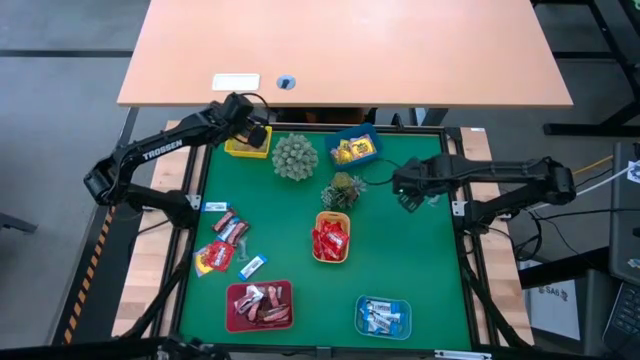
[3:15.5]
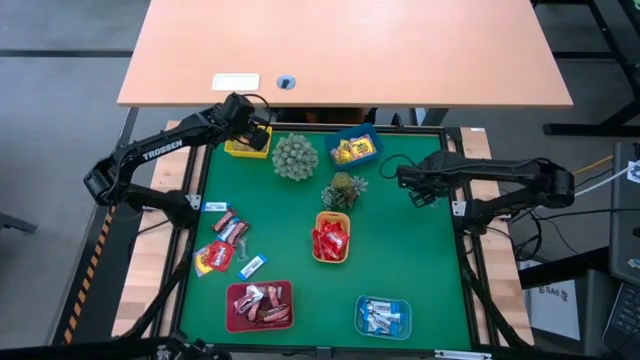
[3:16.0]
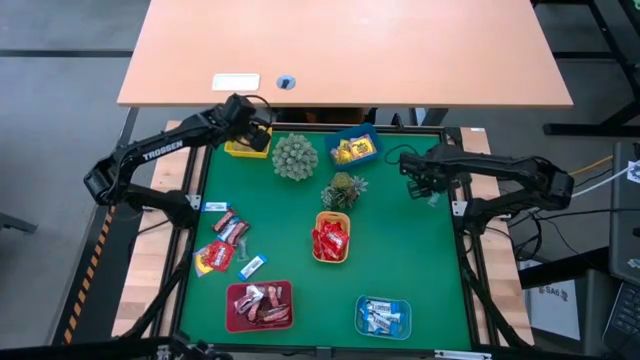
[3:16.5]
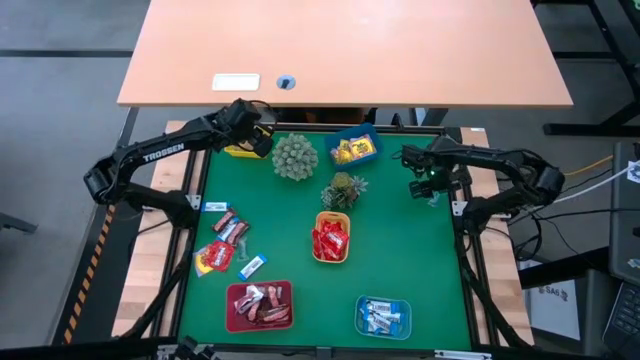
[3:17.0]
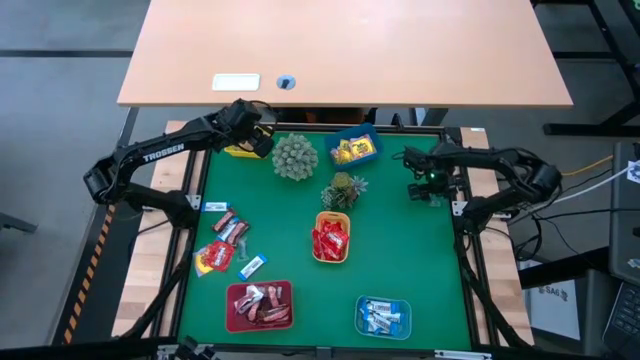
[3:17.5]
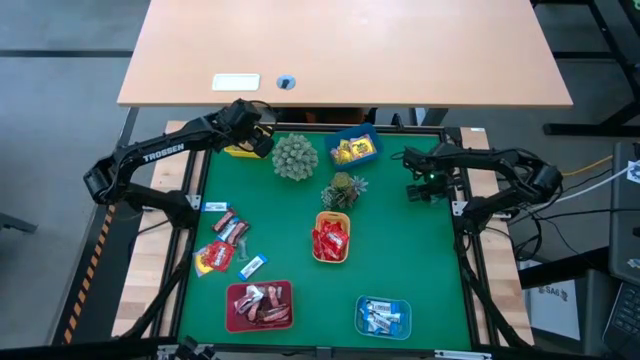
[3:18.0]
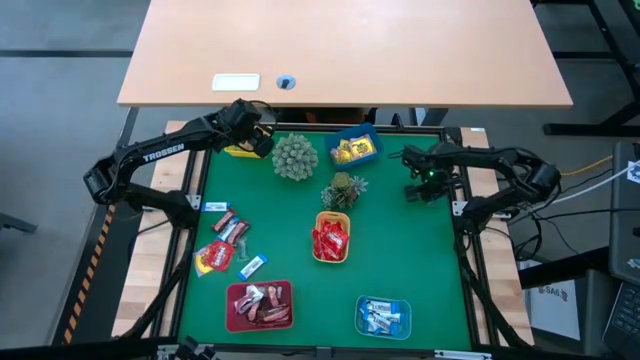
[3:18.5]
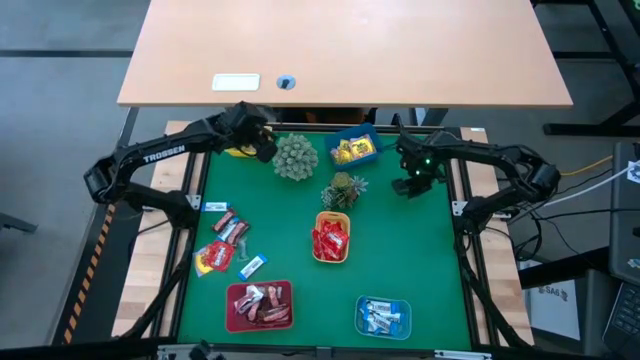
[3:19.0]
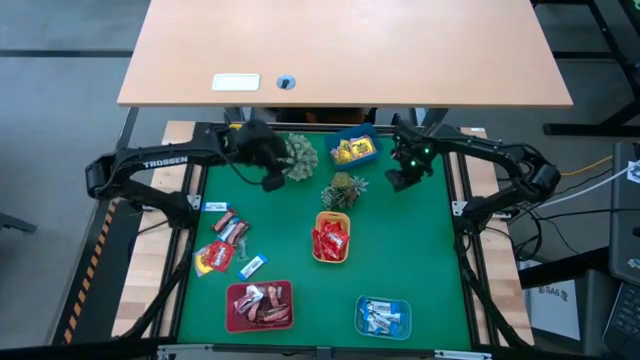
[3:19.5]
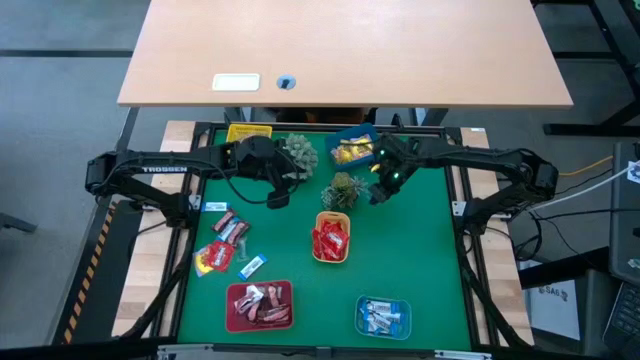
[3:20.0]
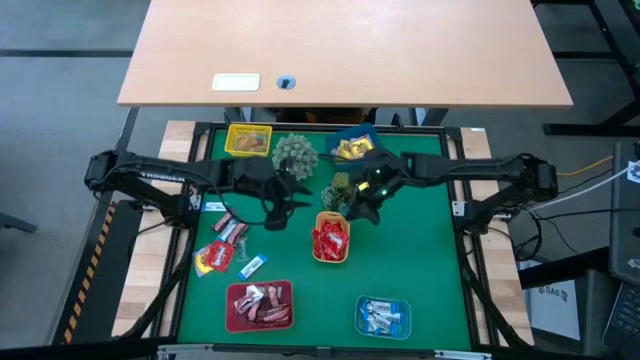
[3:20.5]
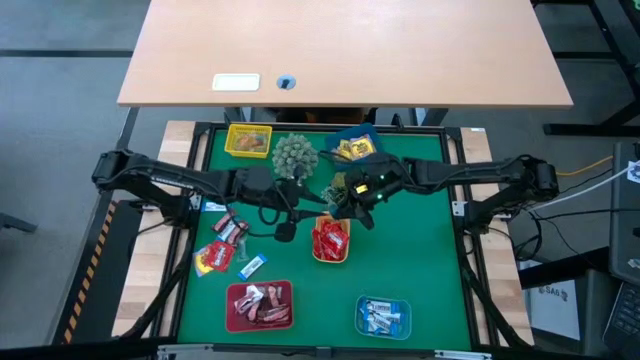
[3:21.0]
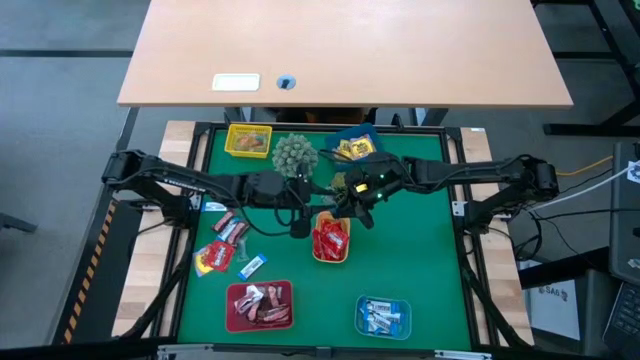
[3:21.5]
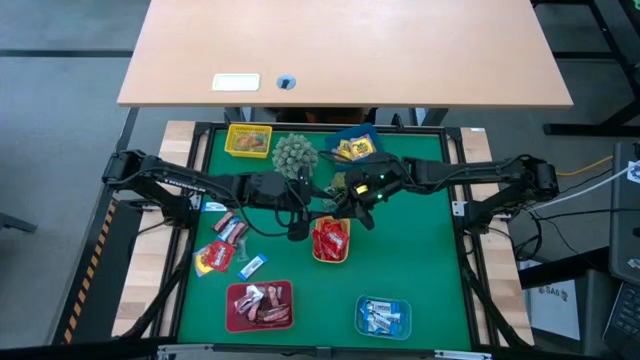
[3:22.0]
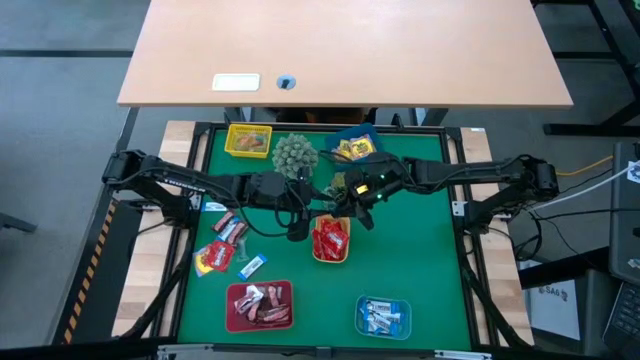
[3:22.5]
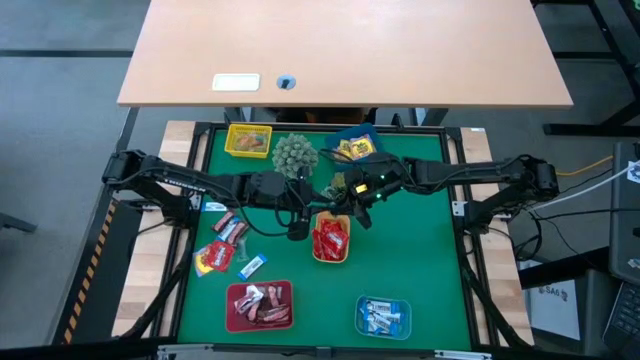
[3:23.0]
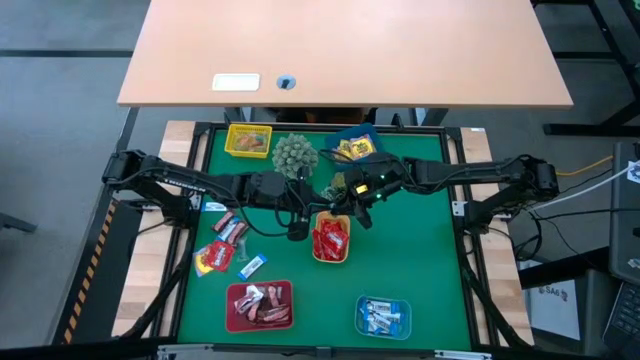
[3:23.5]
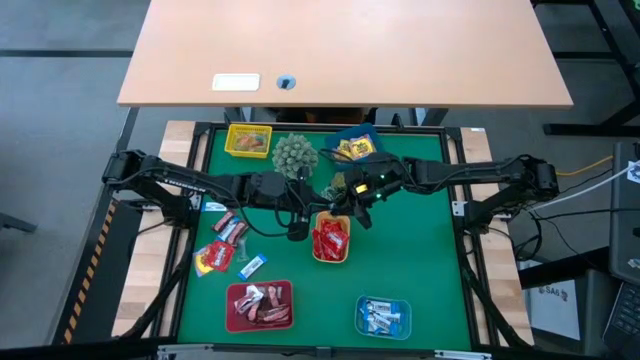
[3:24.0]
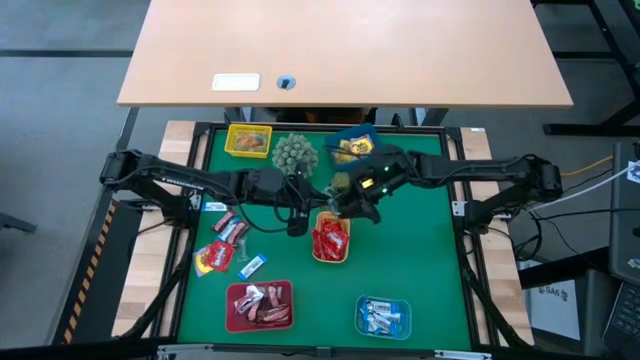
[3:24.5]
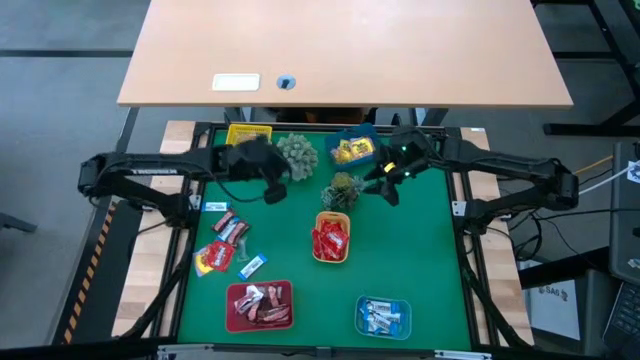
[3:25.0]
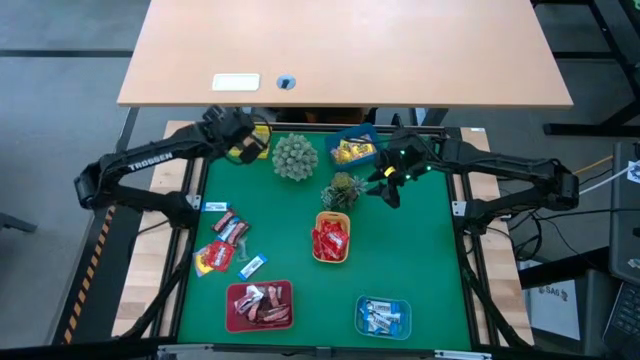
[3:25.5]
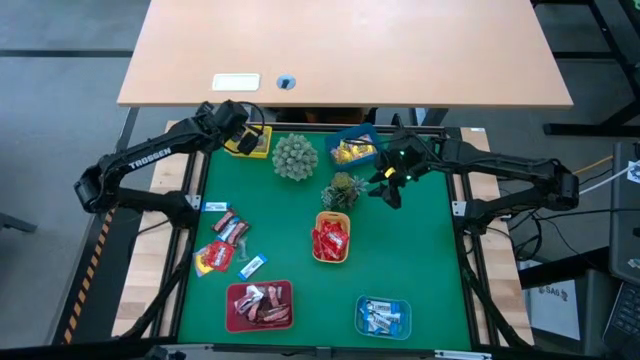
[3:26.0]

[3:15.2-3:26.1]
Task: Sort candy
Put the blue gummy into the yellow bin

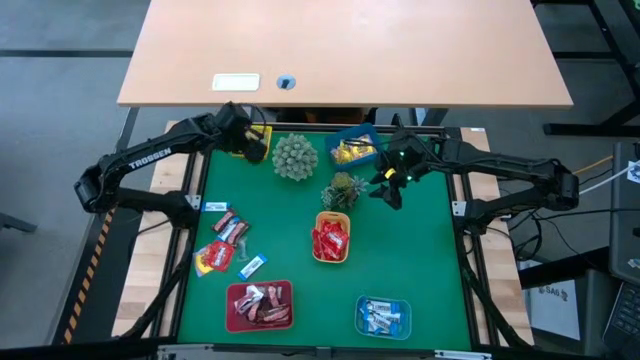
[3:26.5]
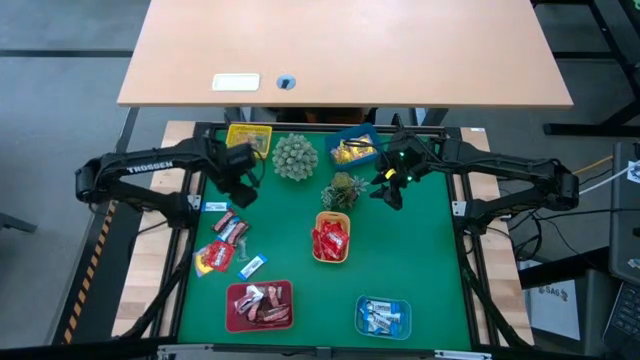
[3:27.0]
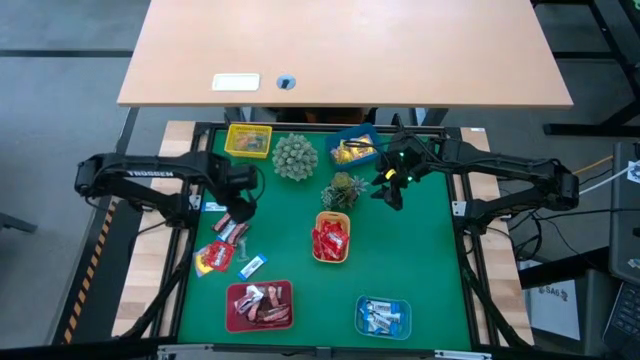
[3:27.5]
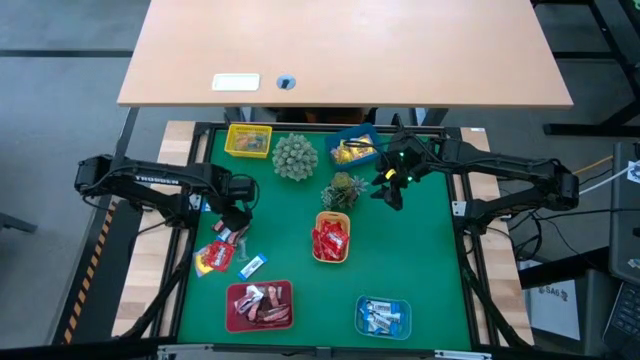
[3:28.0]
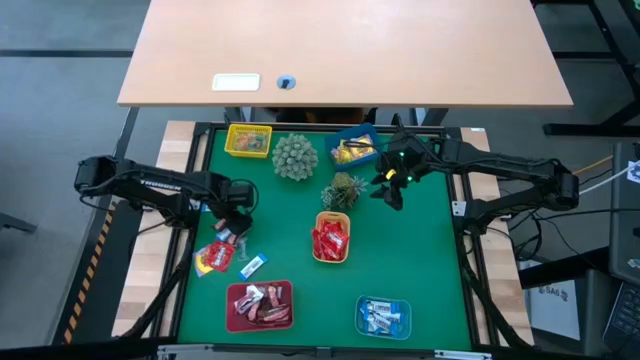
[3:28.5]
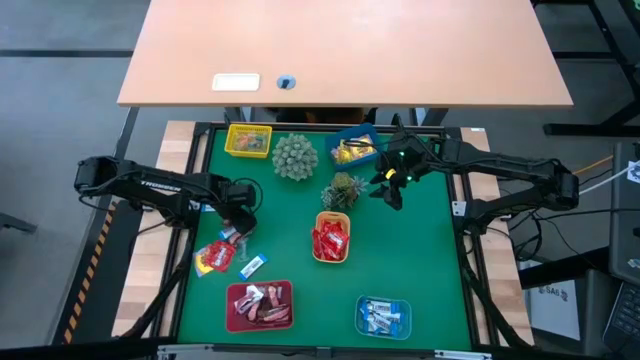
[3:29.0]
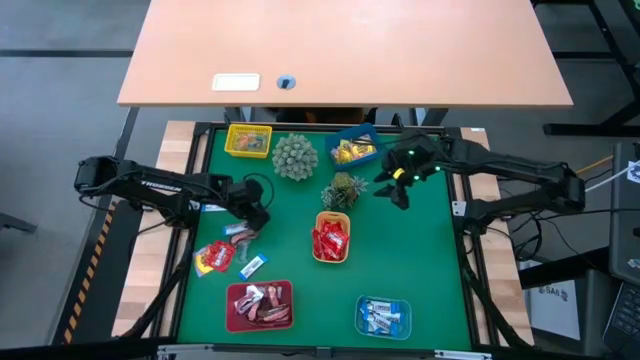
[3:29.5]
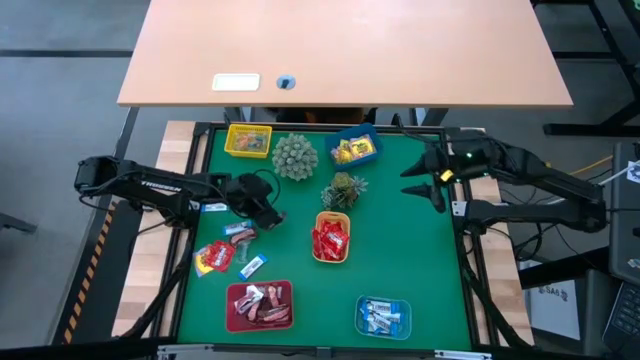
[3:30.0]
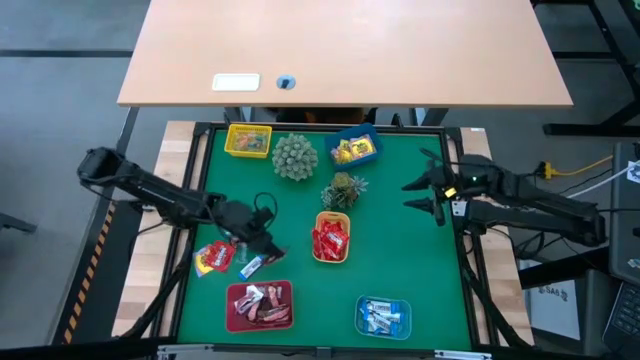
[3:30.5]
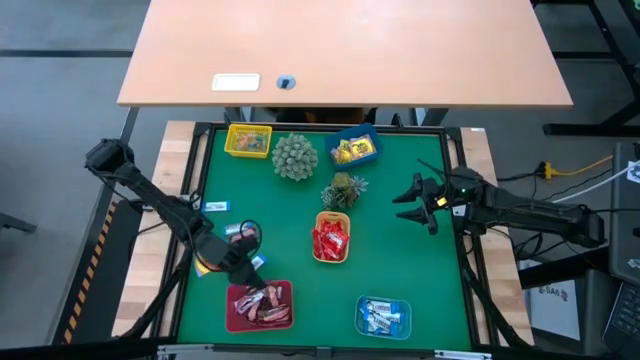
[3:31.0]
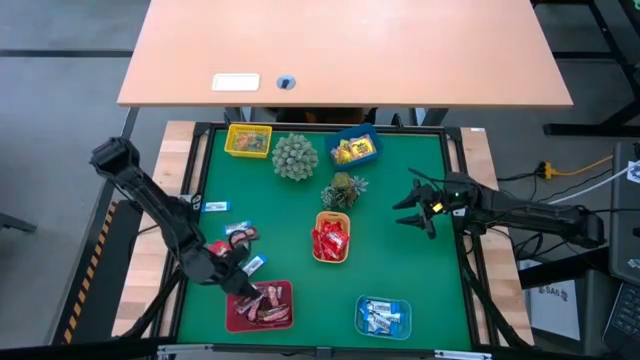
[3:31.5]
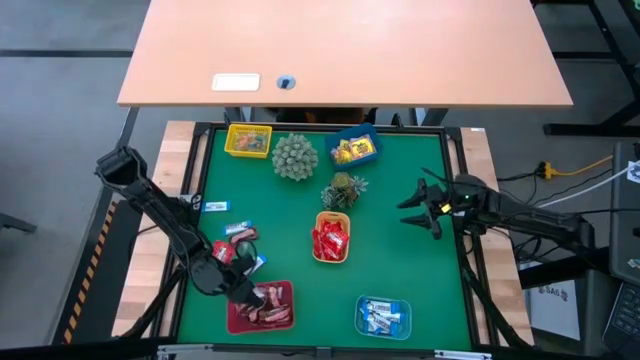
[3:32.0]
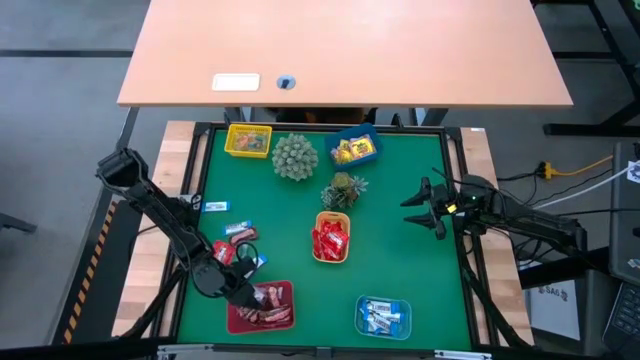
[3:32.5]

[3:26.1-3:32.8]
Put the brown chocolate bar into the red bin

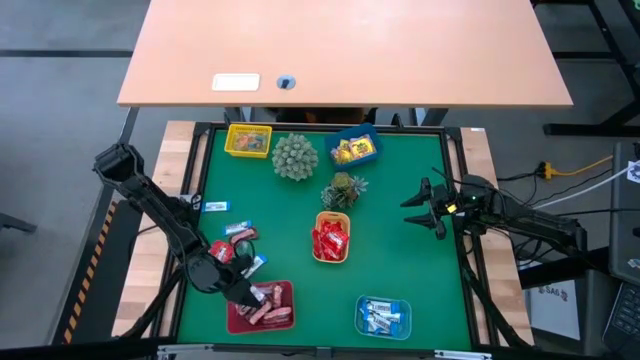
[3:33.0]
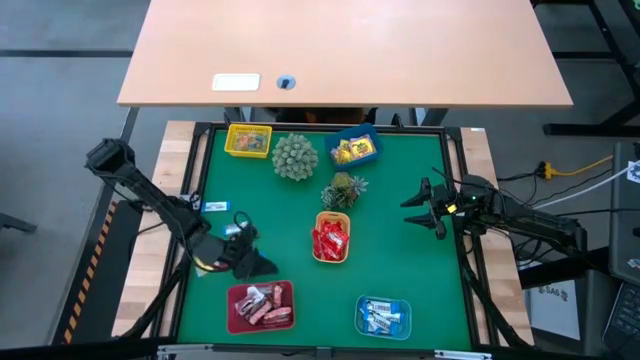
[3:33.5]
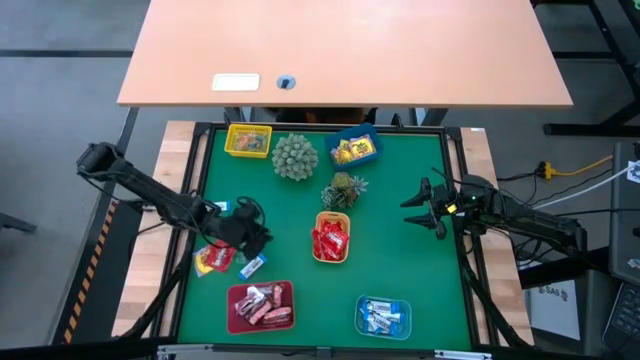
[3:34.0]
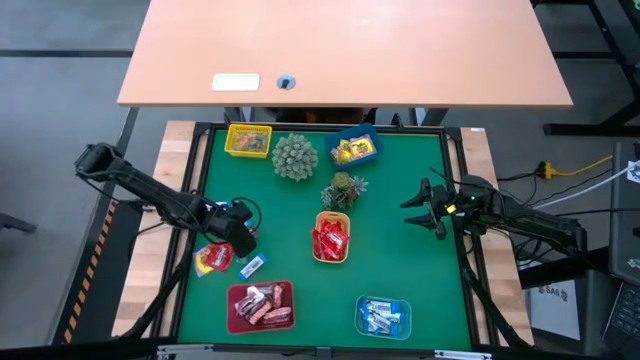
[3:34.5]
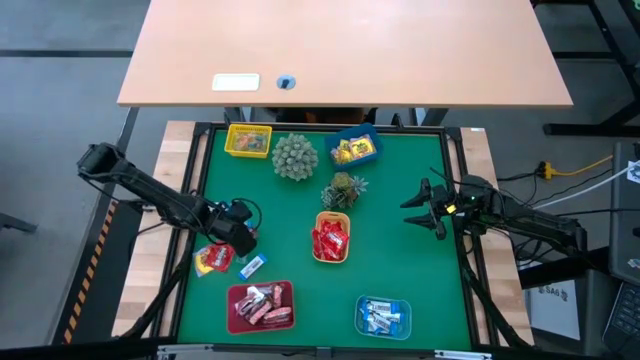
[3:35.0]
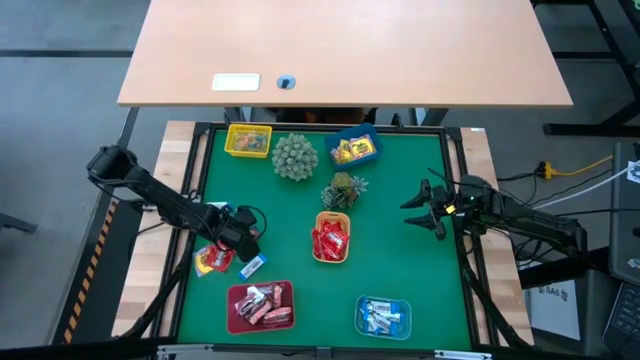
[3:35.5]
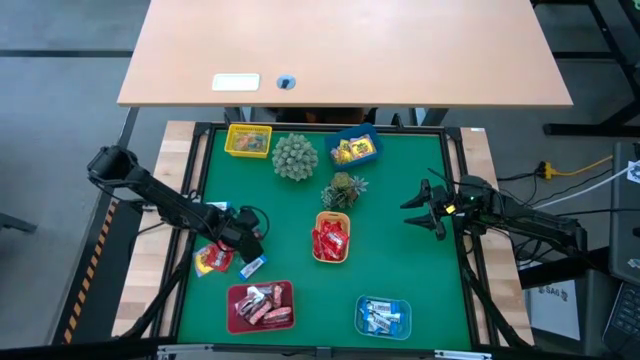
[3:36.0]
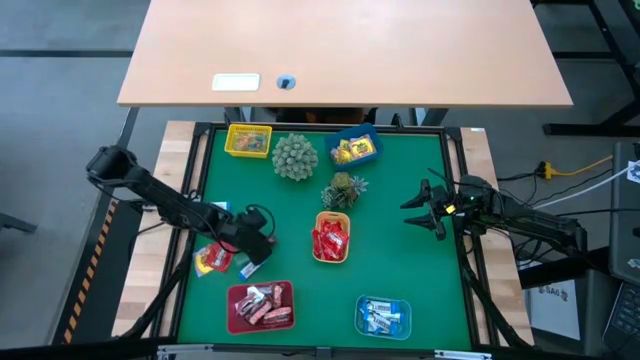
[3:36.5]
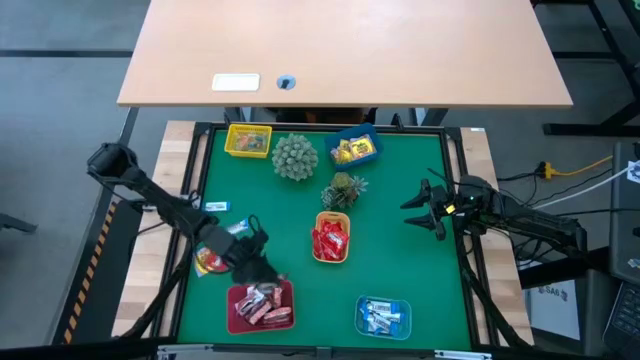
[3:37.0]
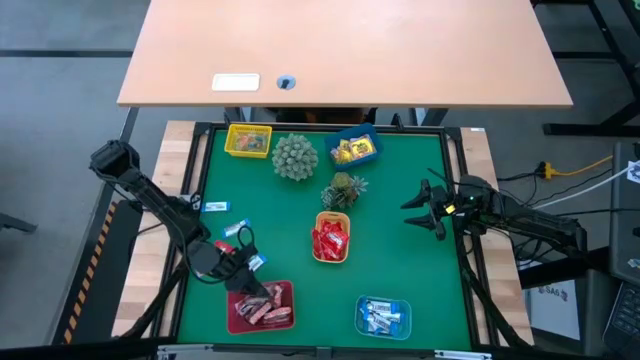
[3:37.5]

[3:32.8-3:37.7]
Put the brown chocolate bar into the red bin
